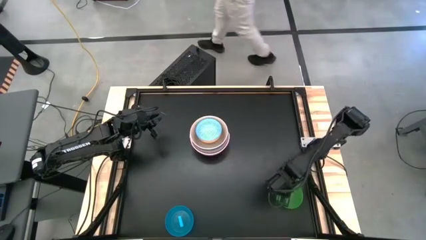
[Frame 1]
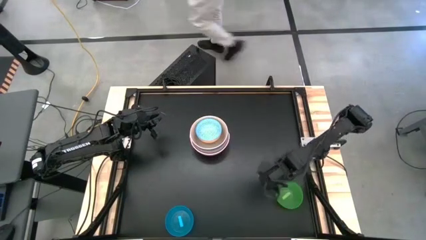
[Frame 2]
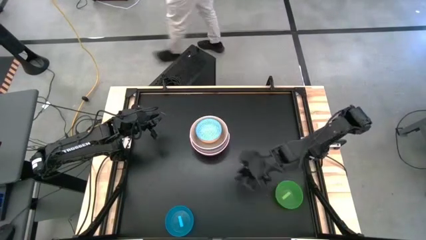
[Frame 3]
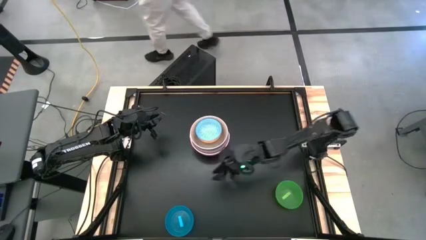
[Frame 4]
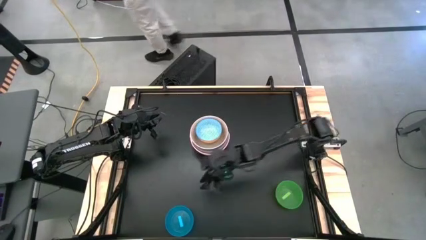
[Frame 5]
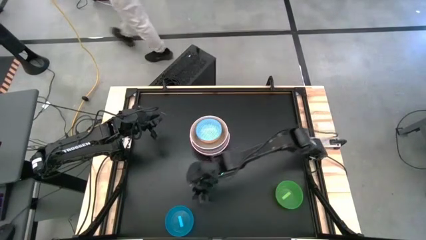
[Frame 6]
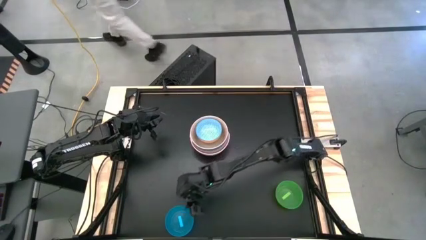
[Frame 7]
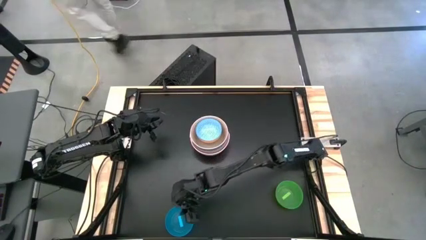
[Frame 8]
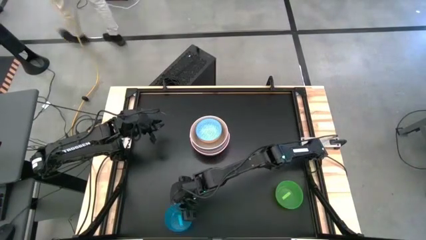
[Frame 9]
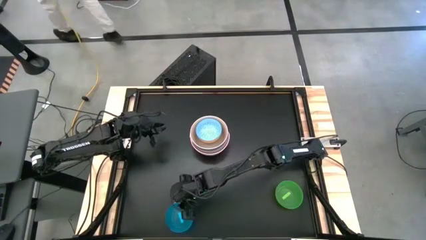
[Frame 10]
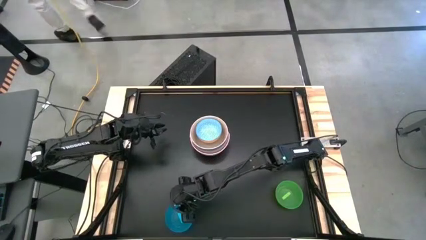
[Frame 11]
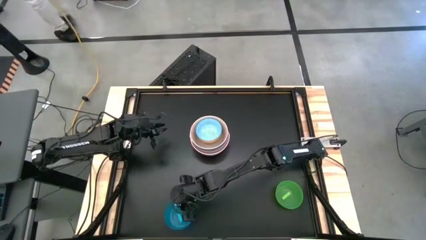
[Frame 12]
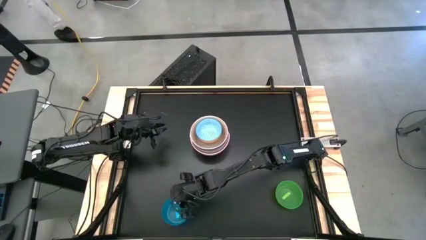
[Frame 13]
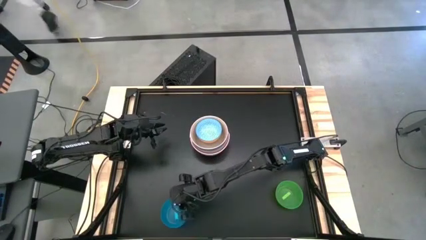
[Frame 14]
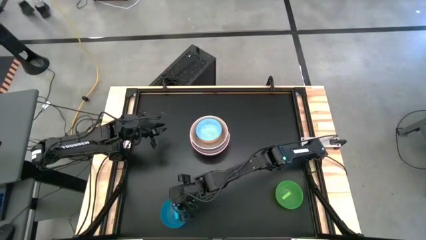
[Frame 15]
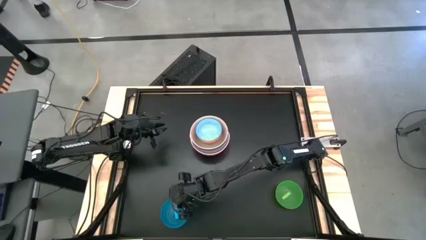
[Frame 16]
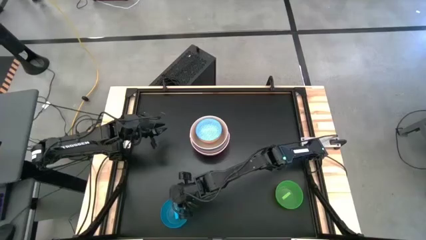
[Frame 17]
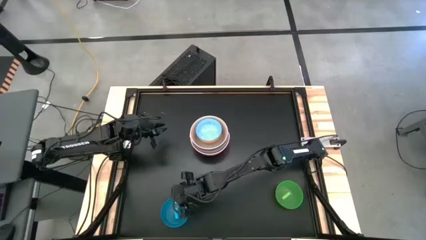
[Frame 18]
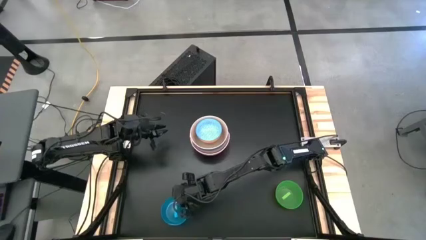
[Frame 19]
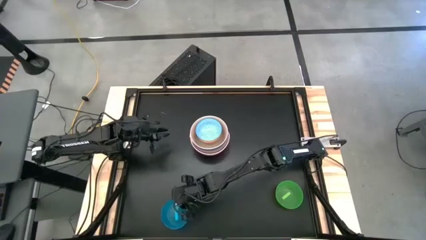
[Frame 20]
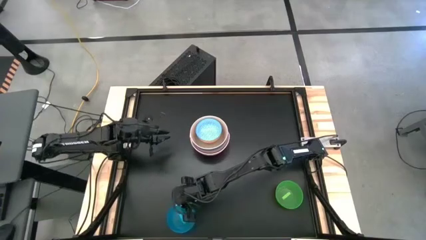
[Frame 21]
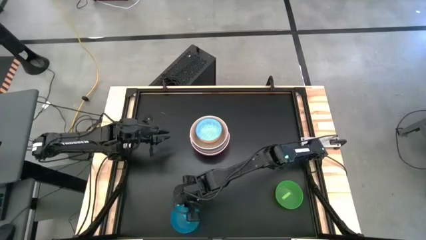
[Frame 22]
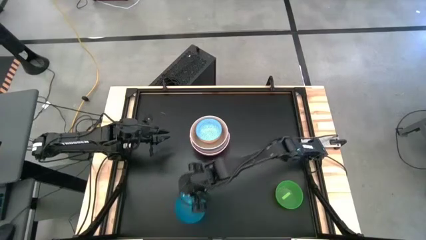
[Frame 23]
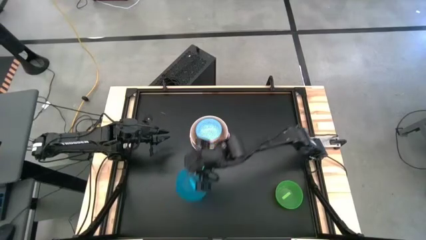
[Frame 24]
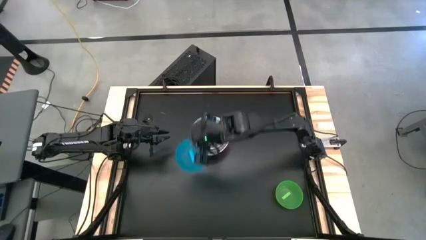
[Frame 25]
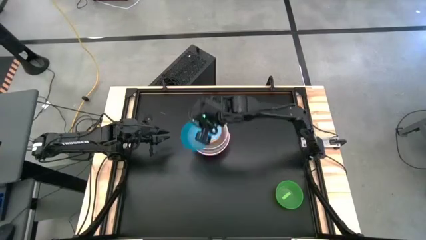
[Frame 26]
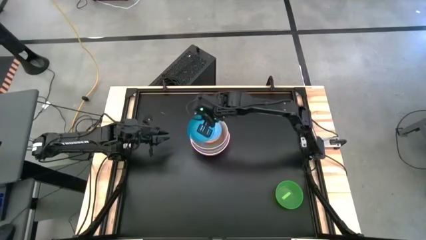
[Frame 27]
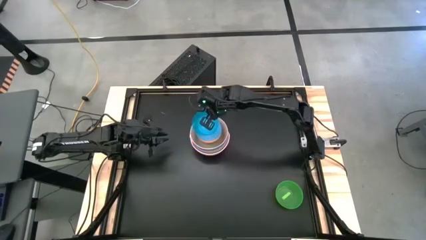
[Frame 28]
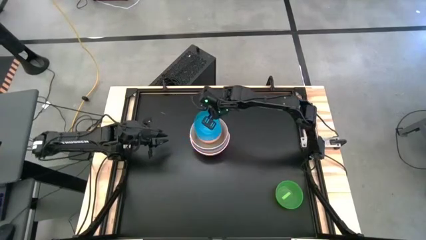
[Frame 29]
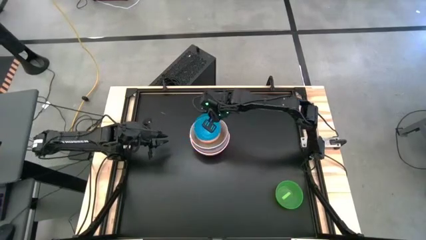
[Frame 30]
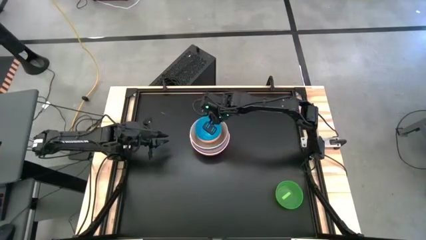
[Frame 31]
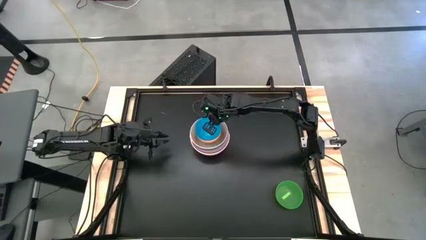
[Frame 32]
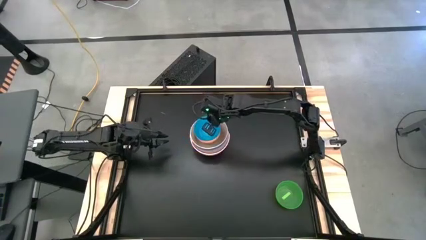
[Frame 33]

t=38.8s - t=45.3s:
Stack the dark blue transparent bowl on top of the light blue bowl

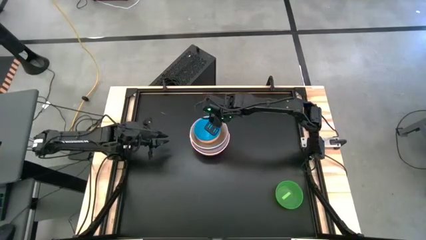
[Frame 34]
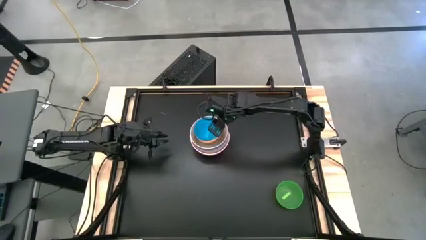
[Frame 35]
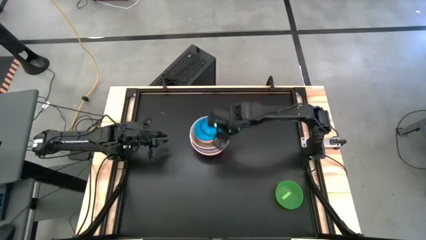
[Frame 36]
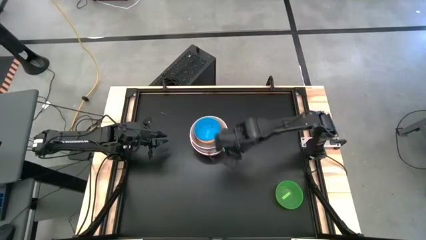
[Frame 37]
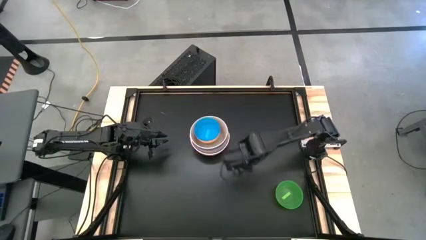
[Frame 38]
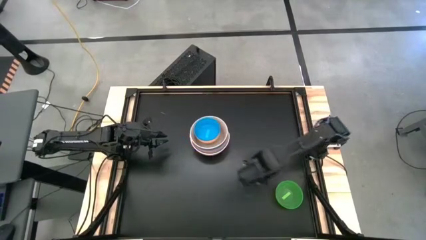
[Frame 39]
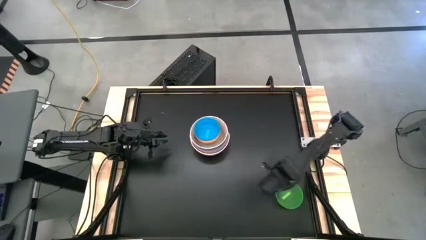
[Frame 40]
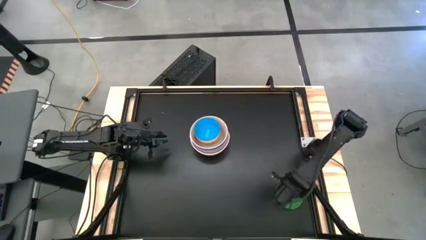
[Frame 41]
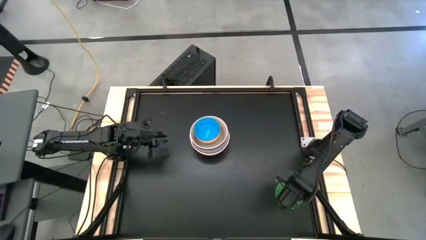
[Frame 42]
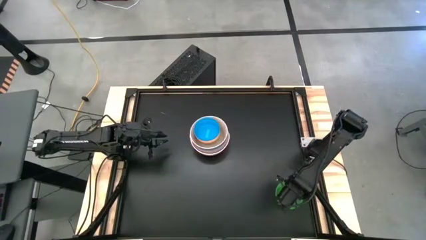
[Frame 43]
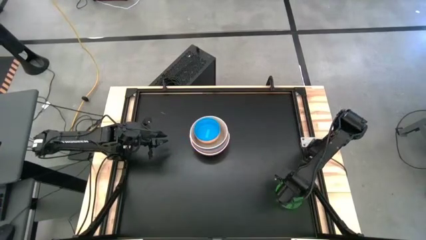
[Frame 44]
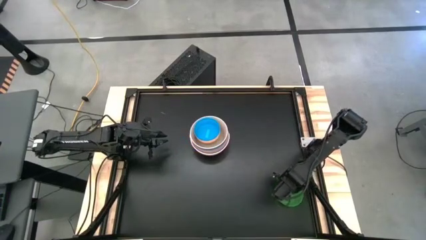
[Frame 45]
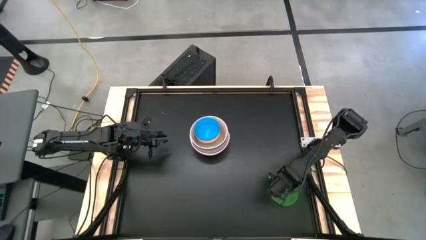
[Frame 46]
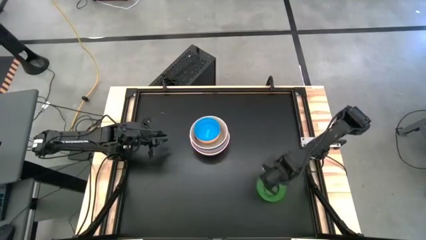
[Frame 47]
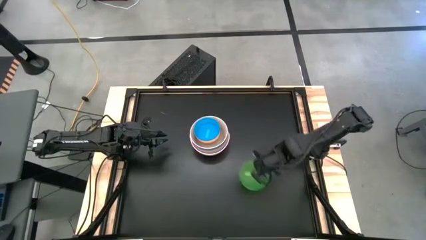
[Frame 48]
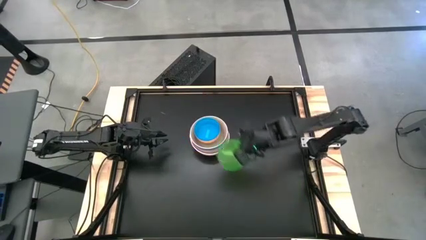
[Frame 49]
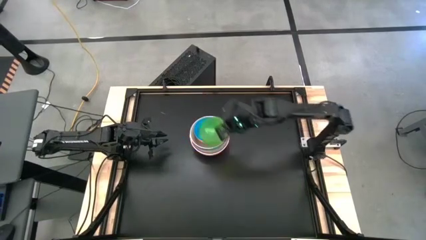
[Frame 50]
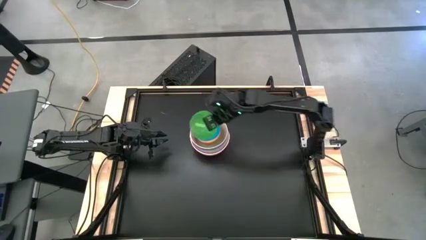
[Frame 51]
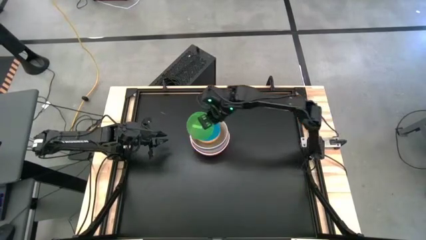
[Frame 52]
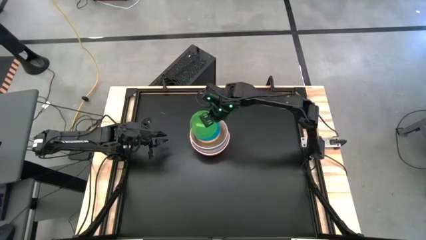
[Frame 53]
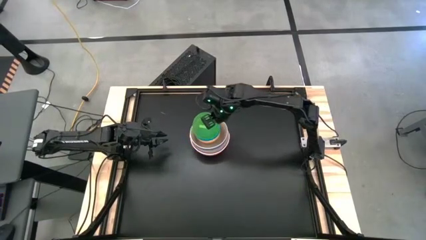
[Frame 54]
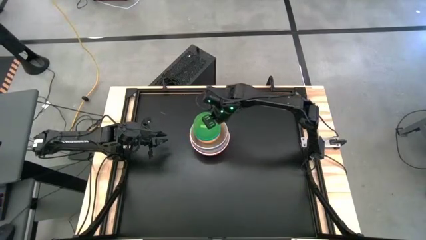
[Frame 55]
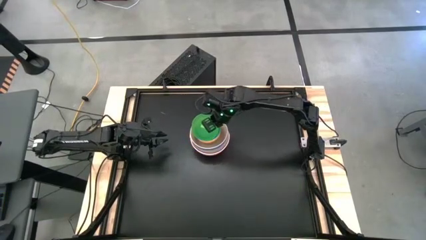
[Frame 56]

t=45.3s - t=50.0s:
Stack the green transparent bowl on top of the dark blue transparent bowl

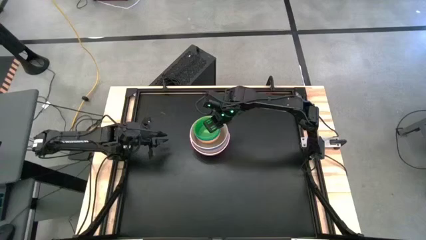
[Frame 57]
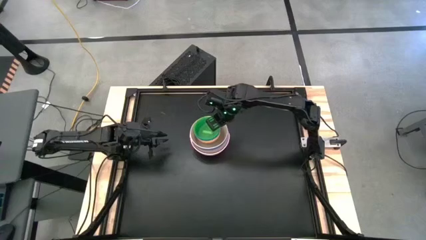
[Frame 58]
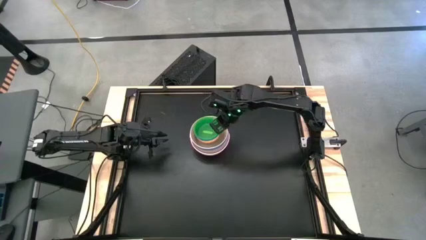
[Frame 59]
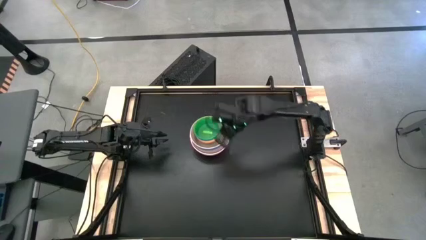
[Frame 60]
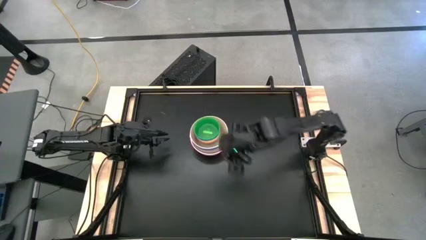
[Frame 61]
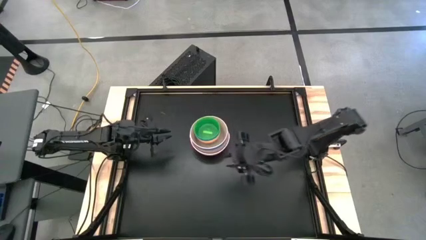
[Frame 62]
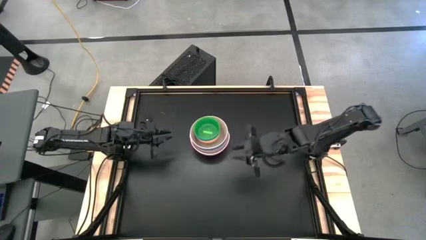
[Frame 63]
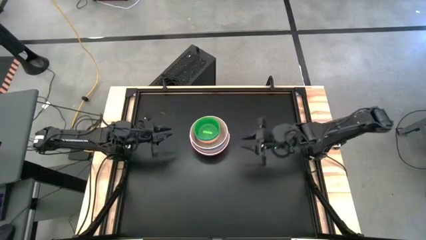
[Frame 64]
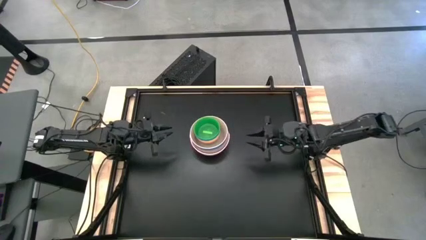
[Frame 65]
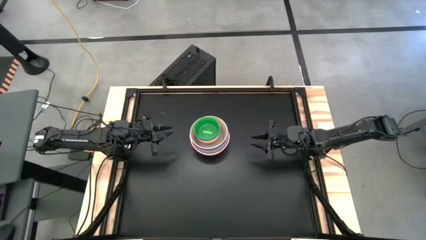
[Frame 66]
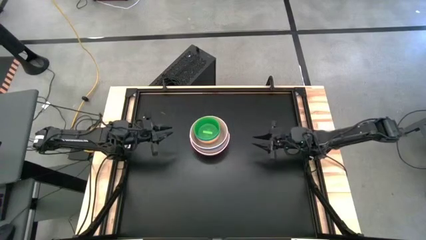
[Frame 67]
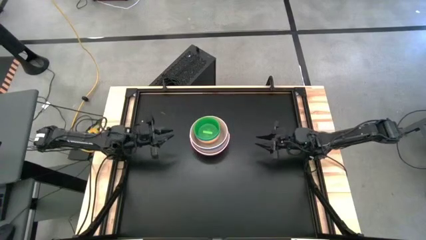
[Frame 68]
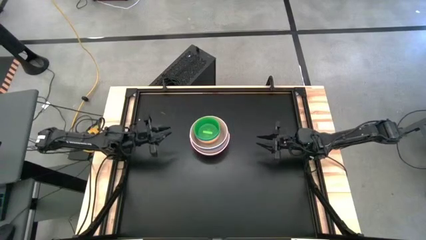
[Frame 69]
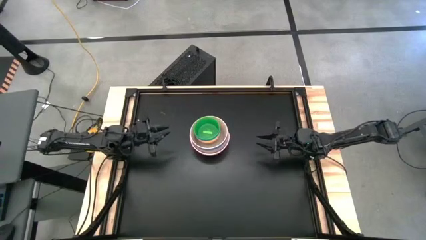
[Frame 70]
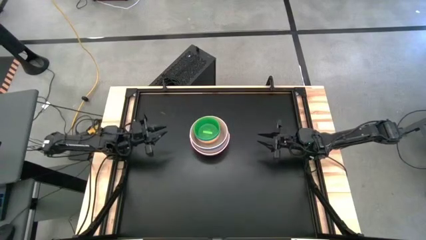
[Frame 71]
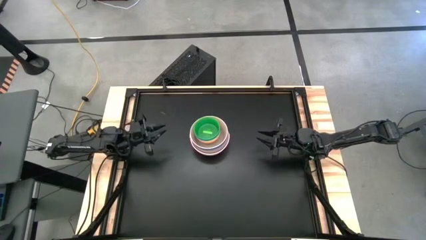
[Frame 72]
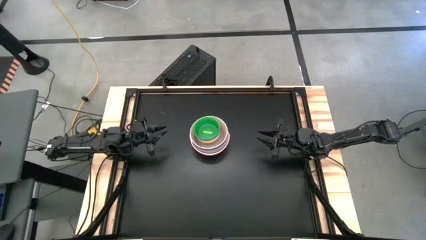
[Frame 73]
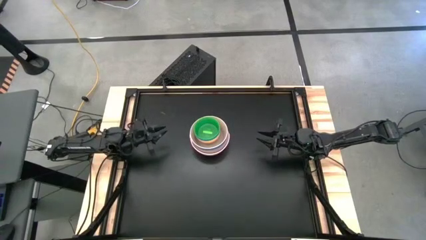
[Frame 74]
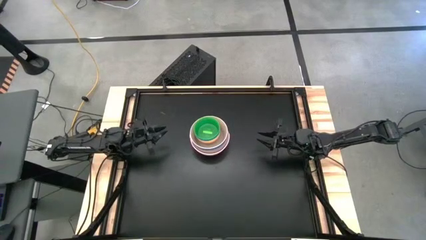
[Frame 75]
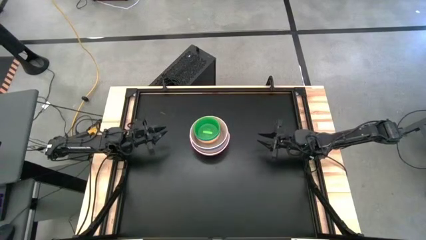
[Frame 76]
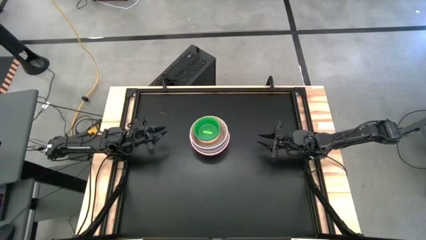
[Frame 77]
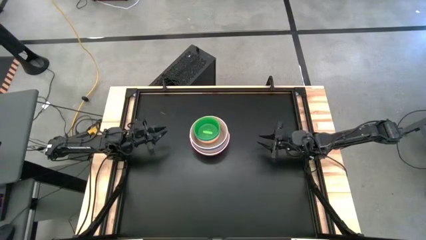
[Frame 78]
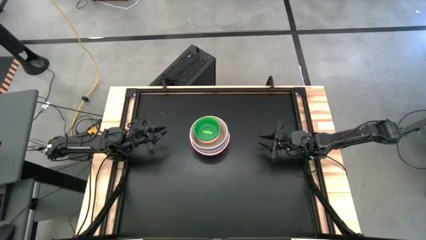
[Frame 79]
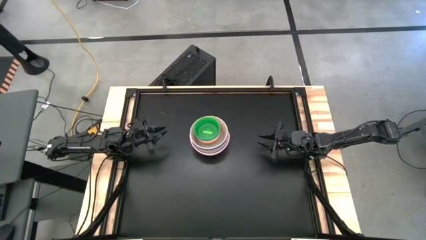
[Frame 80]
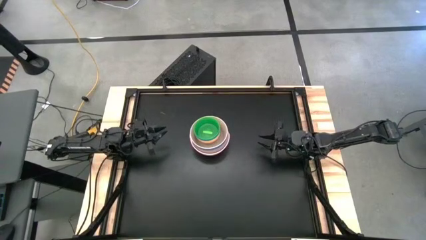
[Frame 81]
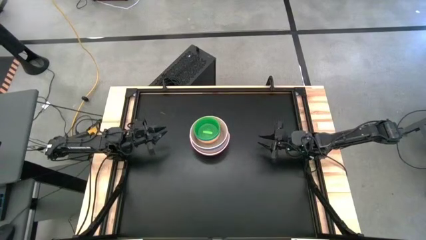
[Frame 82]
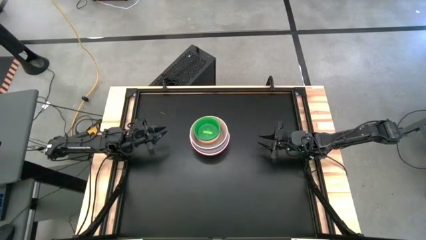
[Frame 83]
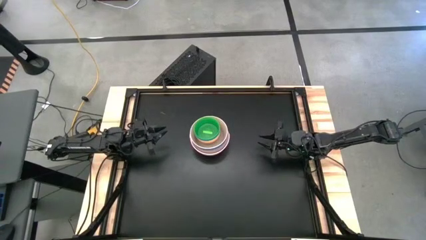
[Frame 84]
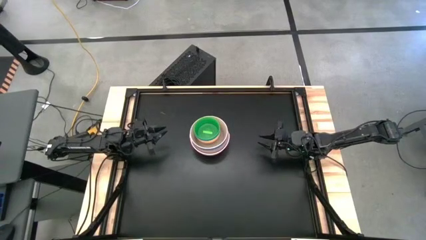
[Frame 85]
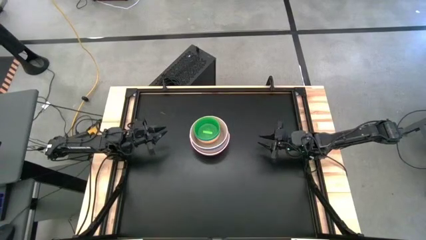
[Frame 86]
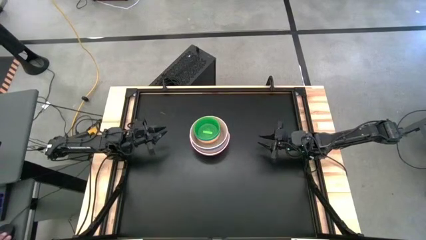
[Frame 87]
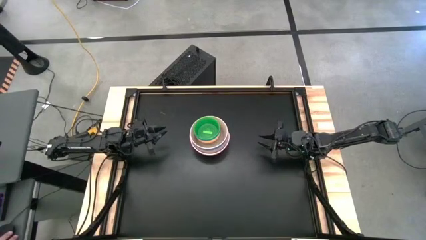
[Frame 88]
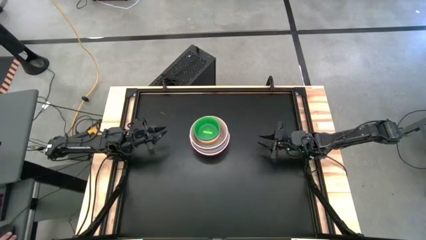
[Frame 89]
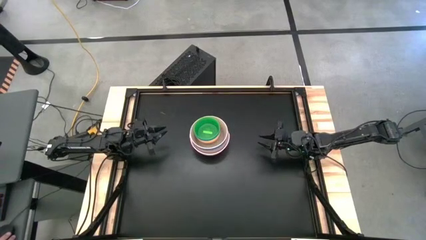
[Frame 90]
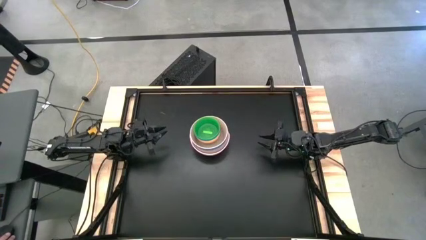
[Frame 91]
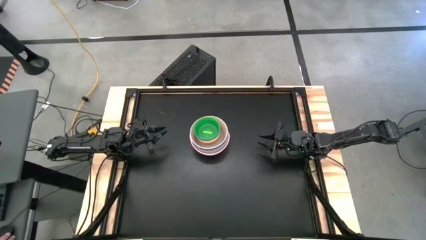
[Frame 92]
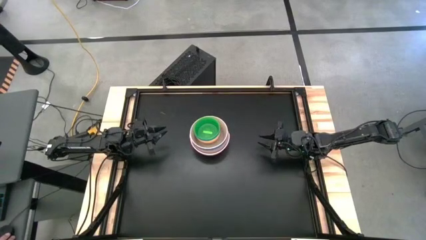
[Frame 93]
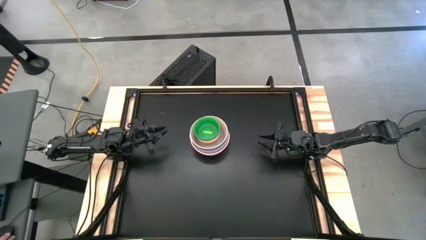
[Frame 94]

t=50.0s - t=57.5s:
Return to Home Position
